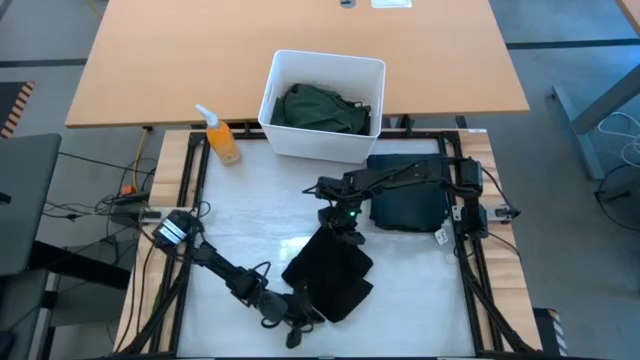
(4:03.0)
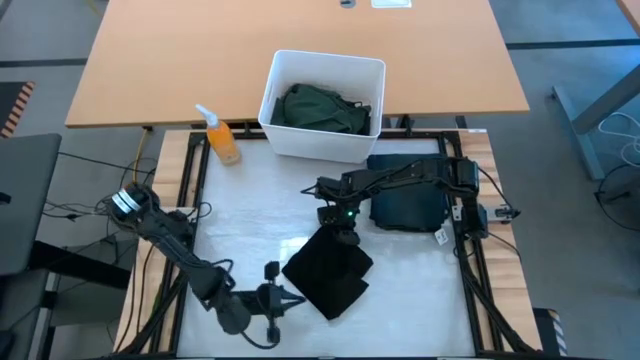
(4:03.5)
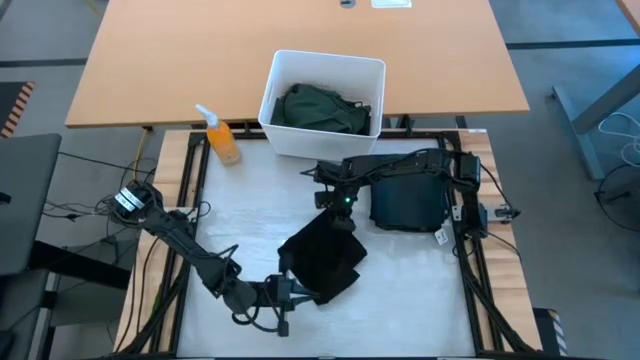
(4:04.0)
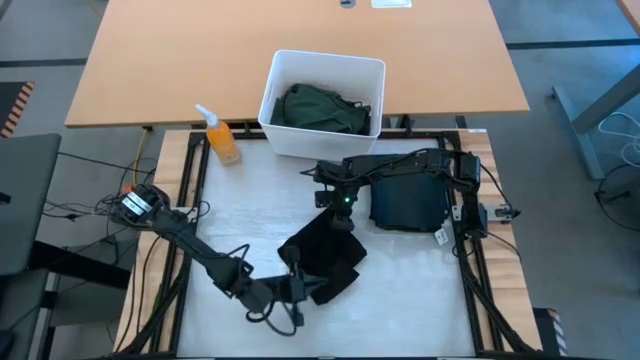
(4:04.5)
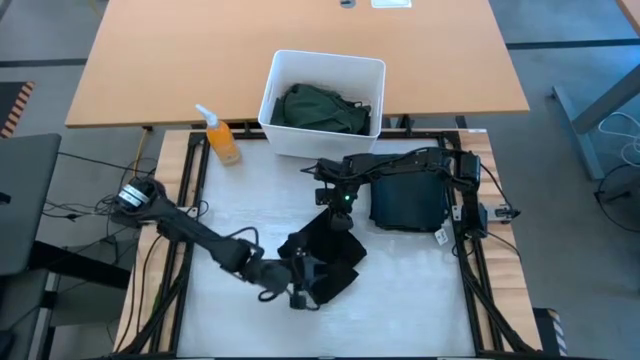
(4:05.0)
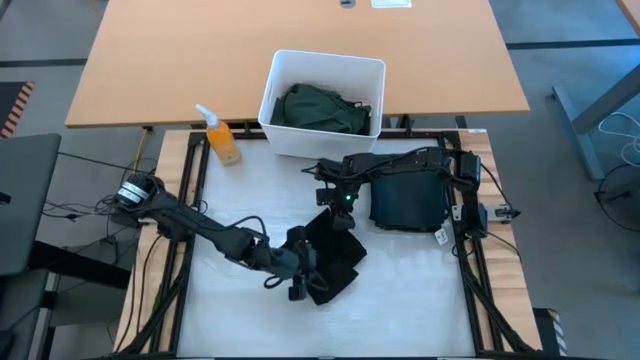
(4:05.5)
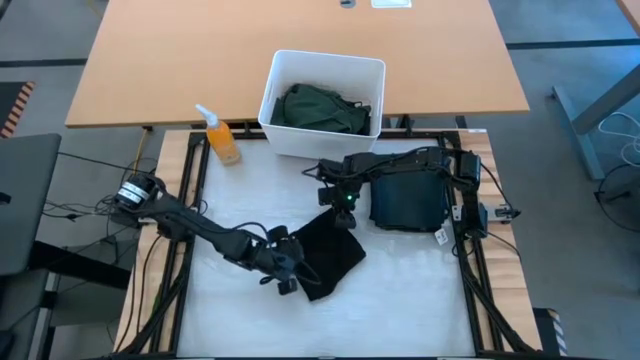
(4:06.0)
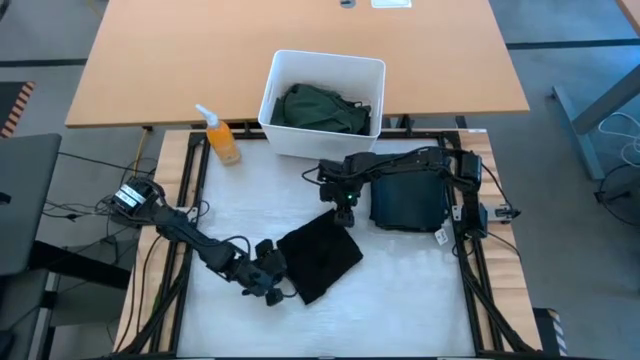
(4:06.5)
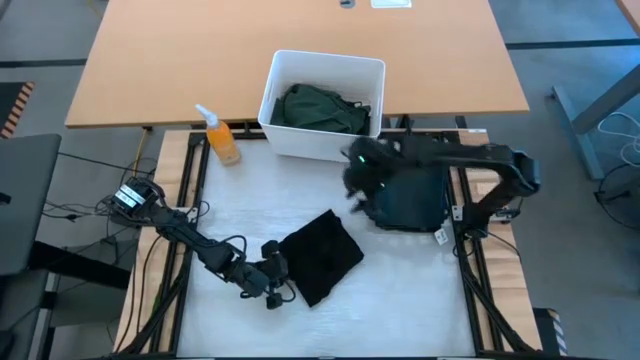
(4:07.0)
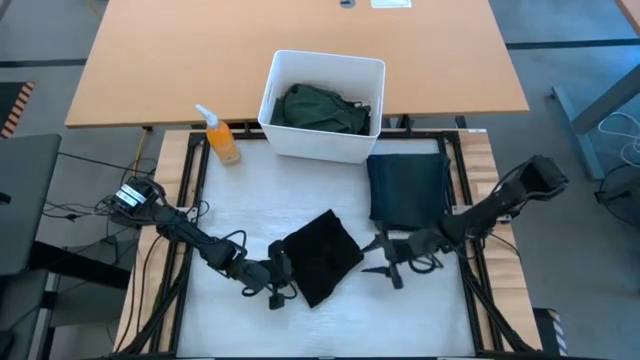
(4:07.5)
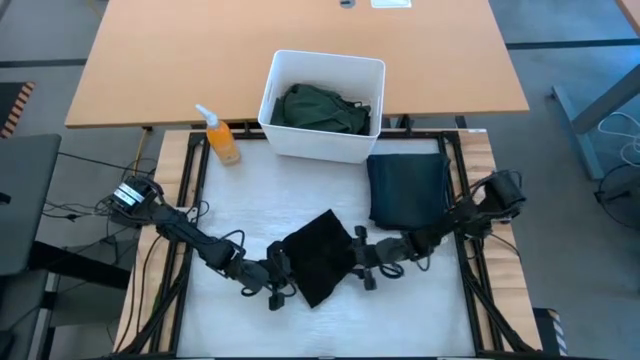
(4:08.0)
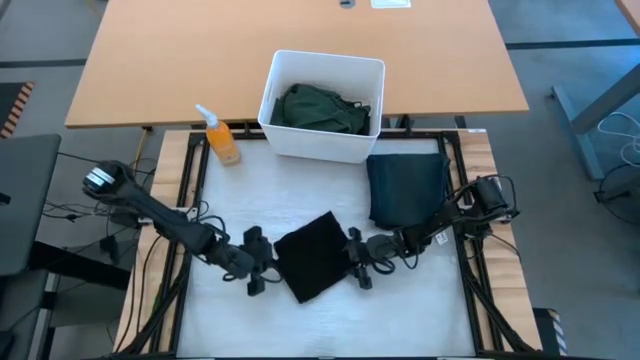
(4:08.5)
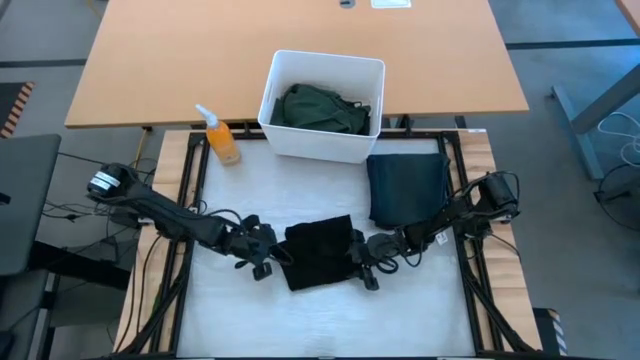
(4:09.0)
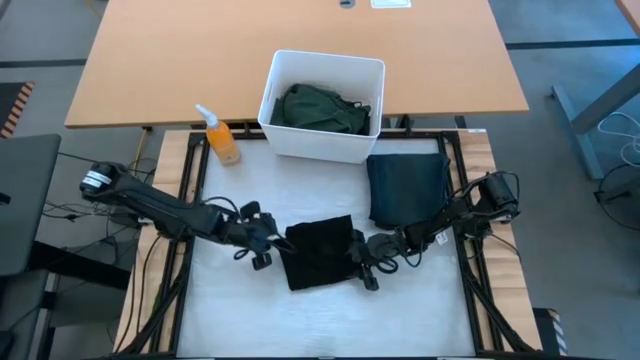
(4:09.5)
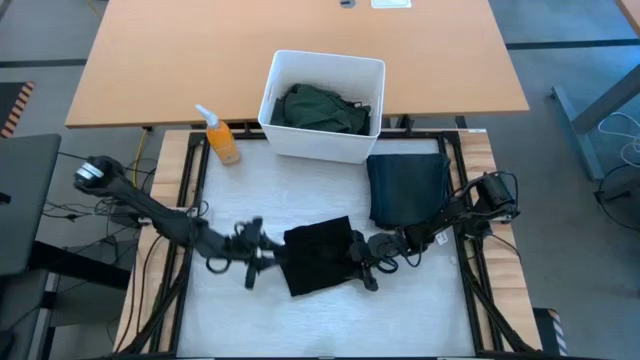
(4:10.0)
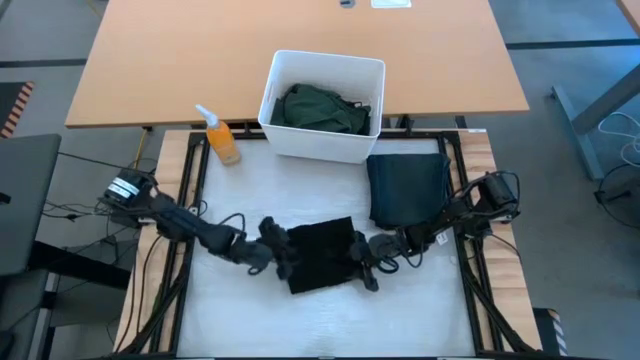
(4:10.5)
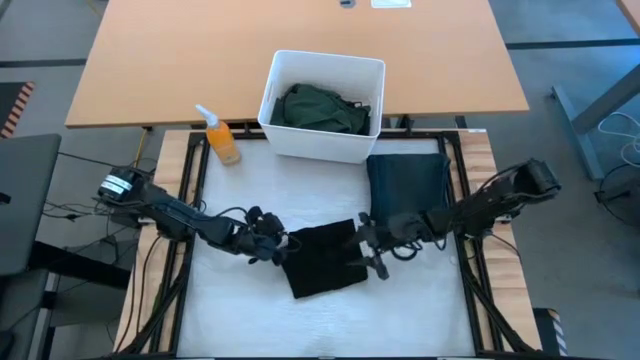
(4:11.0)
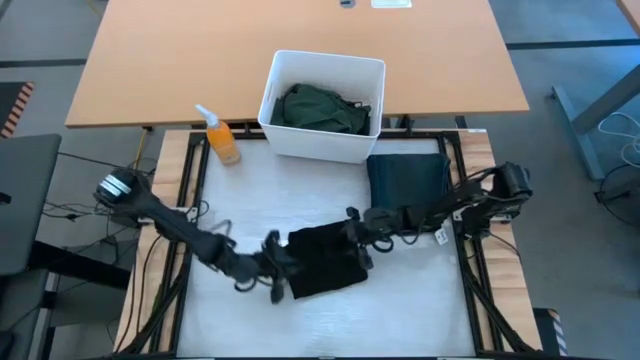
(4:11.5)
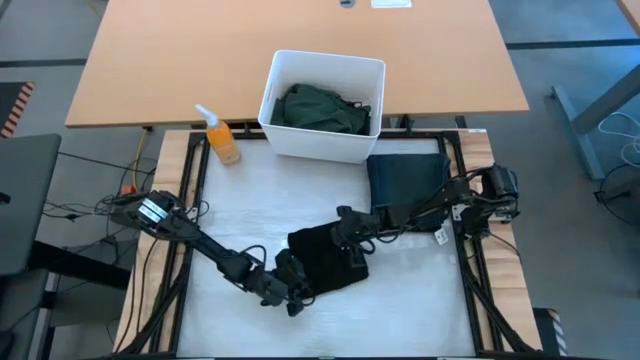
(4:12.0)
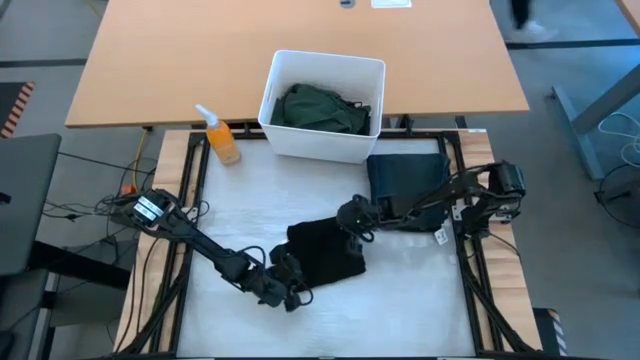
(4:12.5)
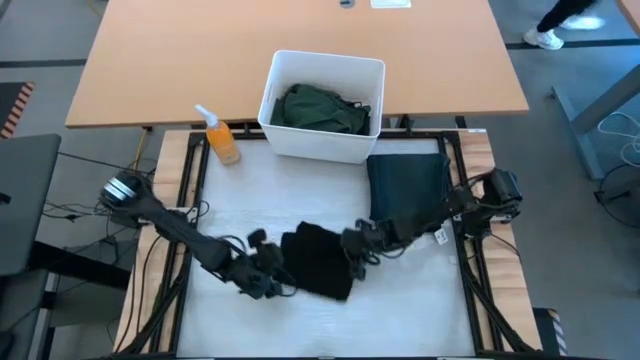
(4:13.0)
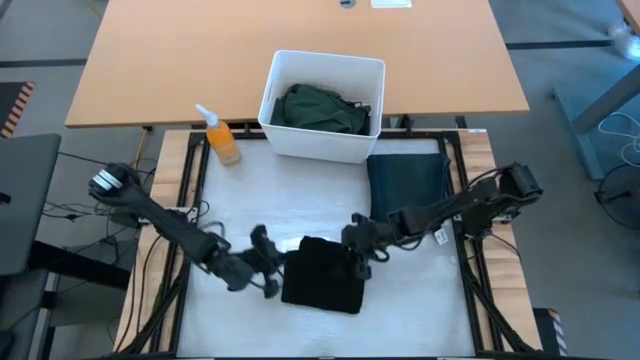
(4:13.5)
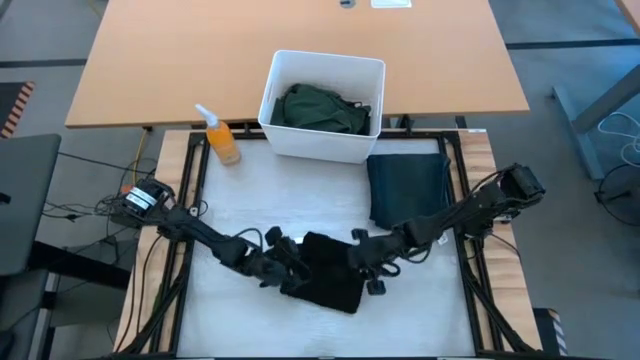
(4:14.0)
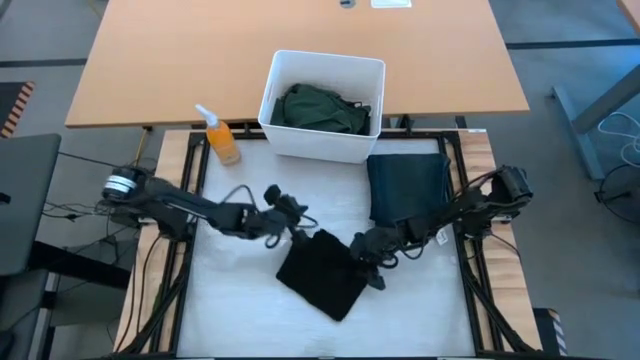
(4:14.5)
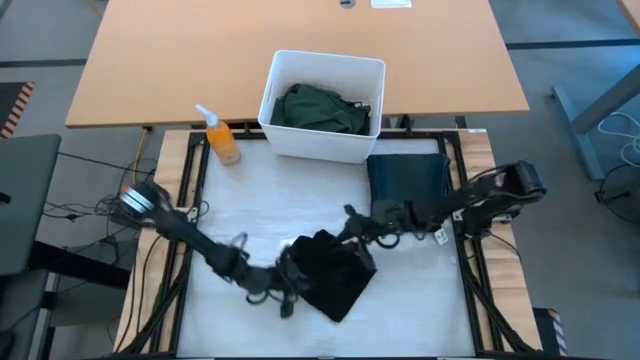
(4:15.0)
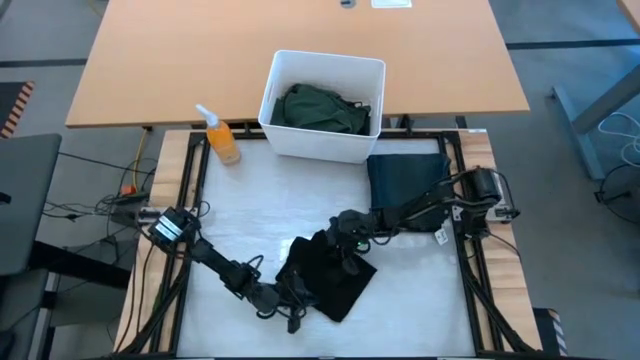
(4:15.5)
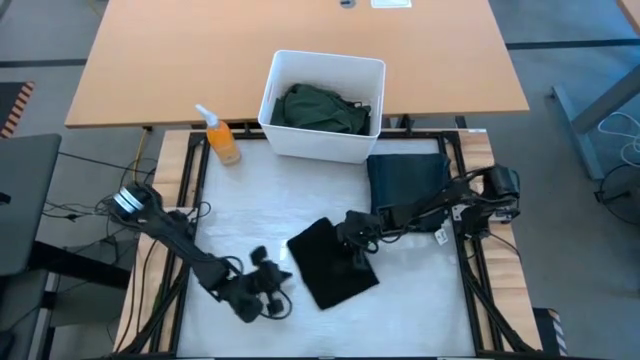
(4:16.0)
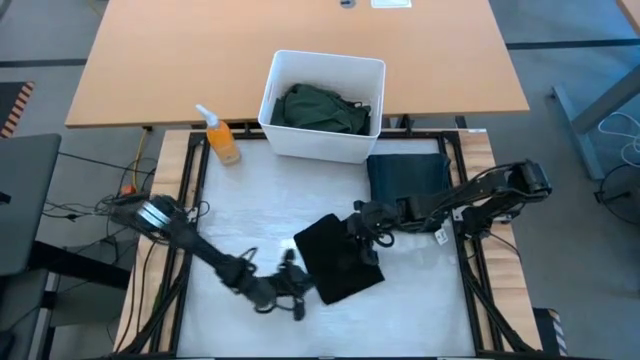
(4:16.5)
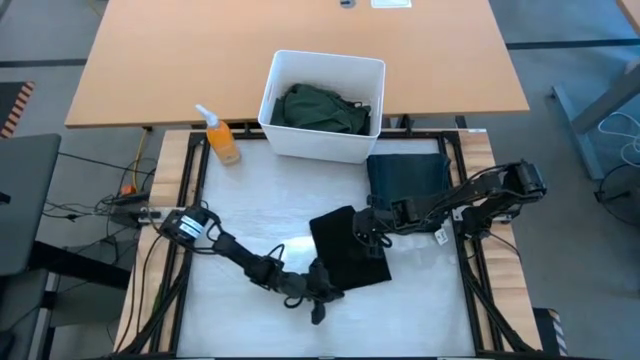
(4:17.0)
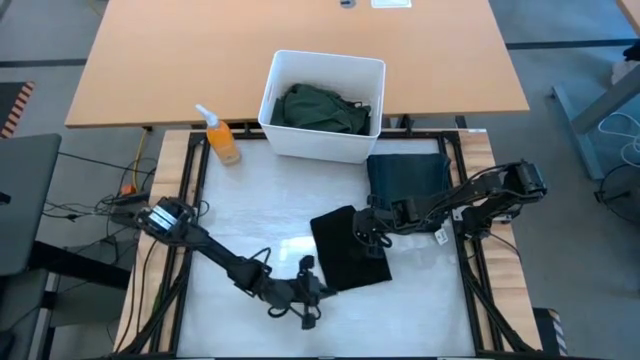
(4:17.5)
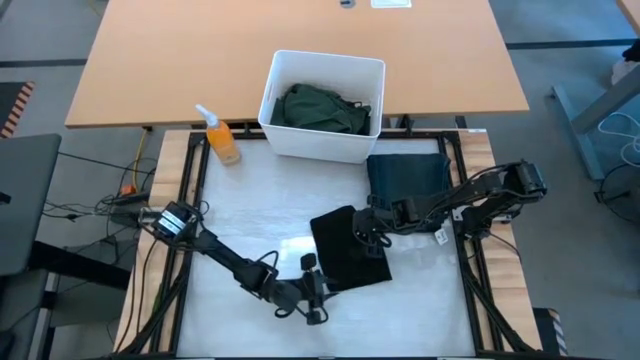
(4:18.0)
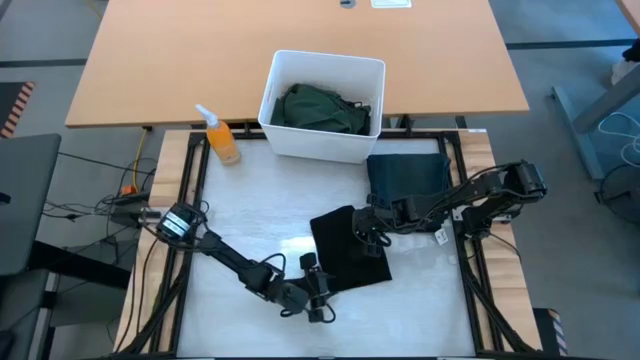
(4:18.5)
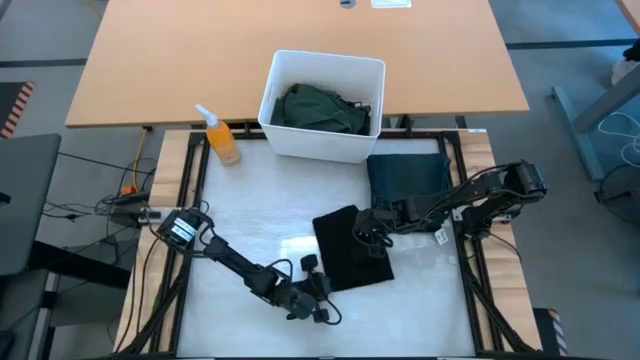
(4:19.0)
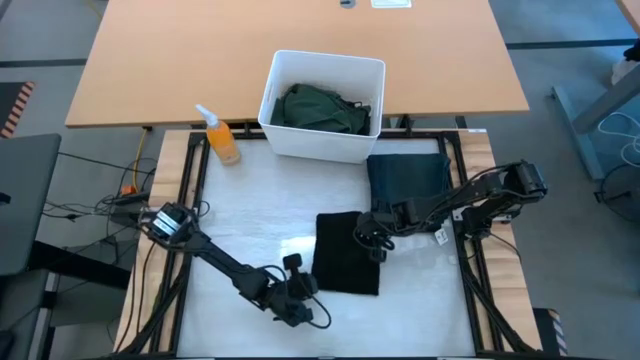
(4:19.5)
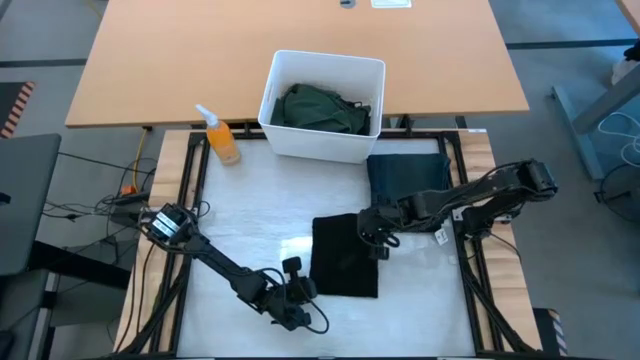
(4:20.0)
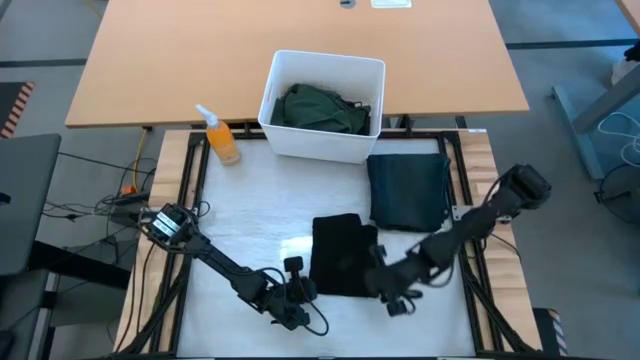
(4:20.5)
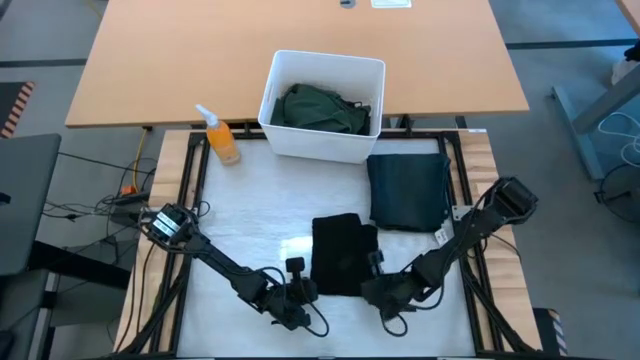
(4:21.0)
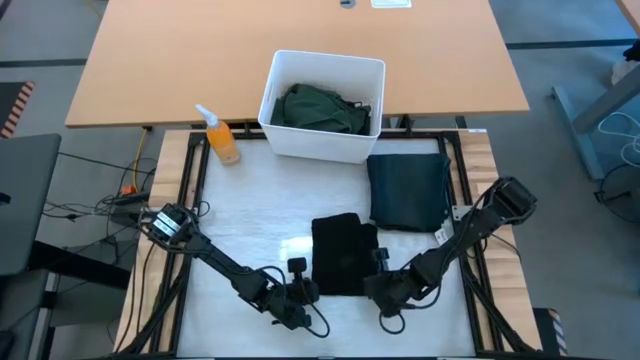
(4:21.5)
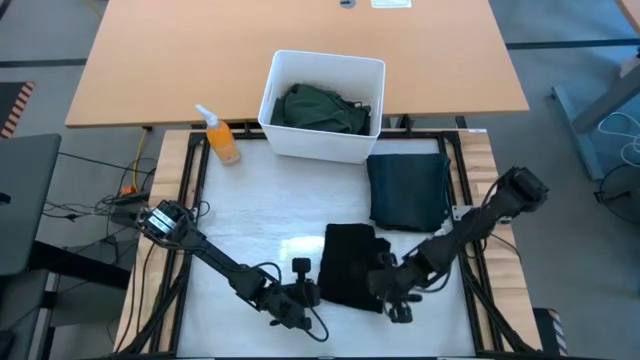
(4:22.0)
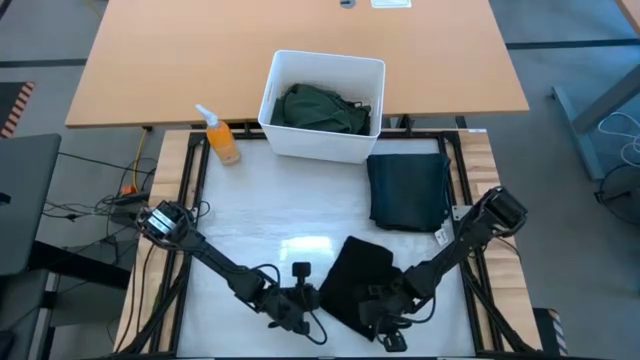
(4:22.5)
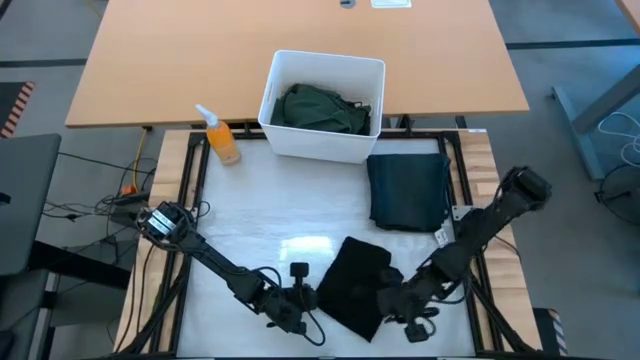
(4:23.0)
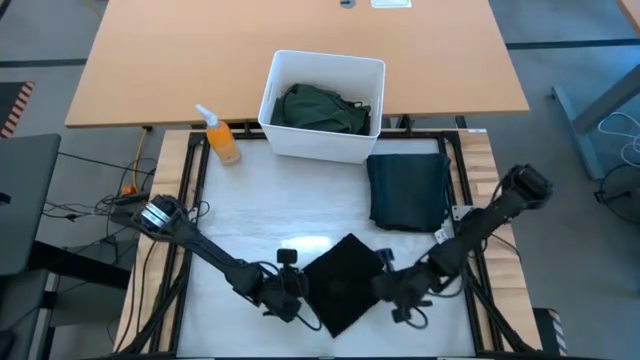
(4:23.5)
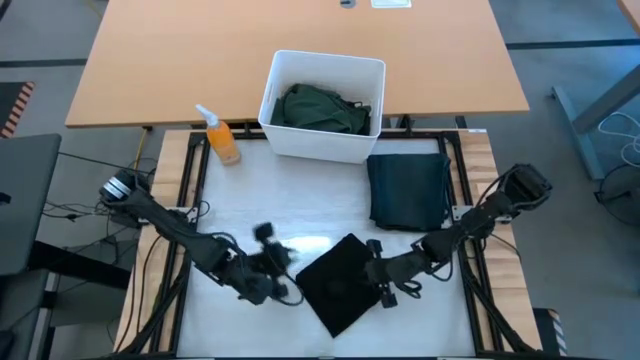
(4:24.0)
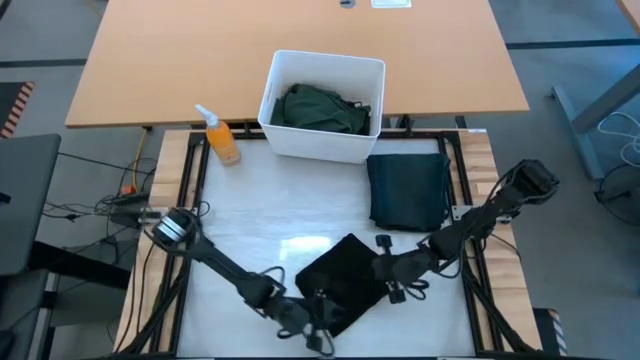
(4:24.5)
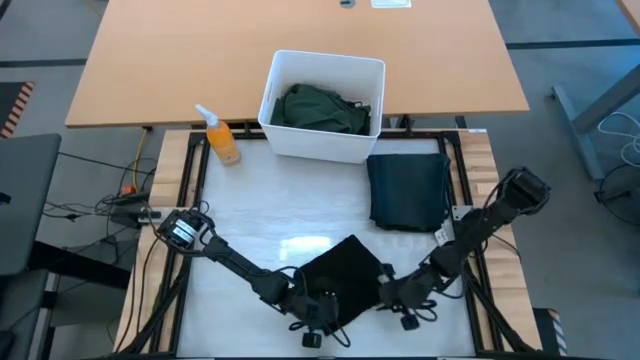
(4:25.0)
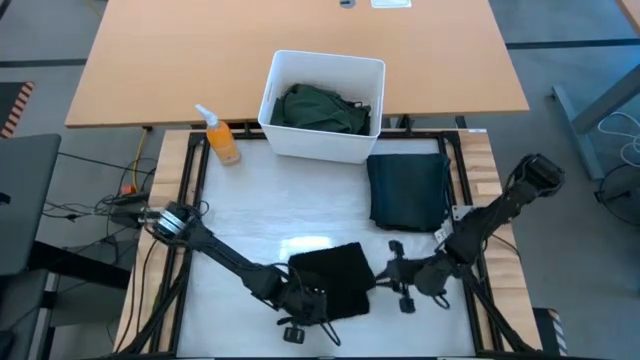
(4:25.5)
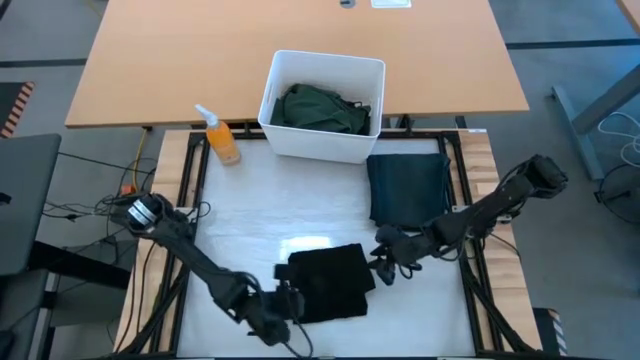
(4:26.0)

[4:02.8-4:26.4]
Task: Fold laundry
Fold the black t-shirt
